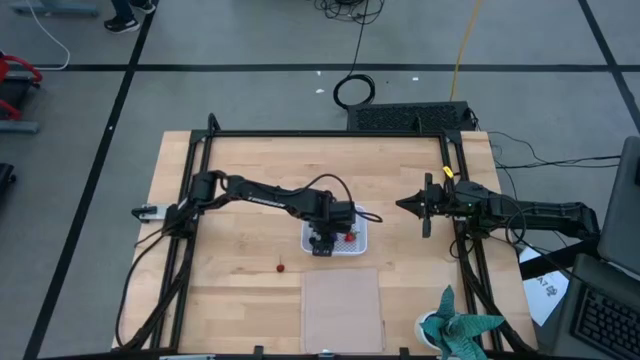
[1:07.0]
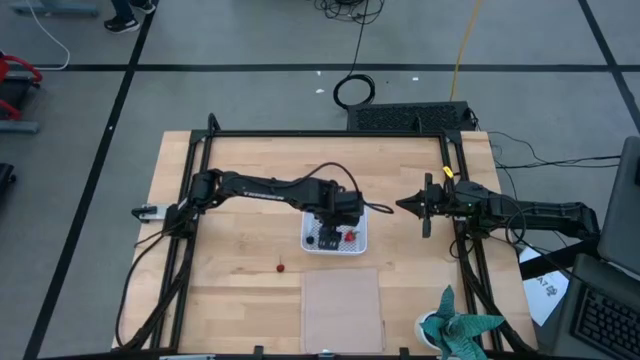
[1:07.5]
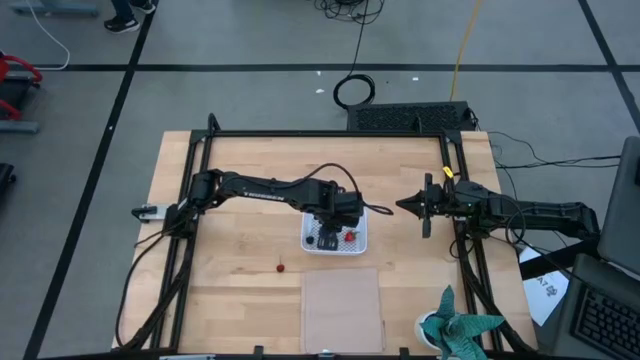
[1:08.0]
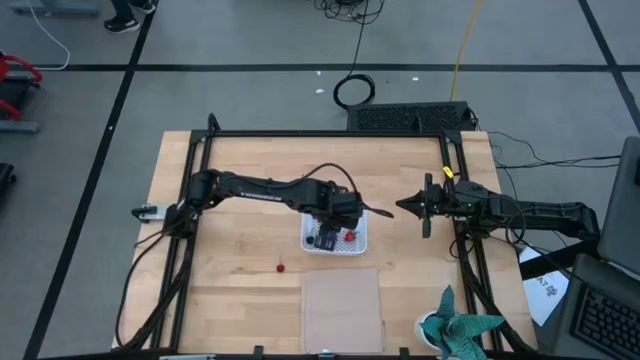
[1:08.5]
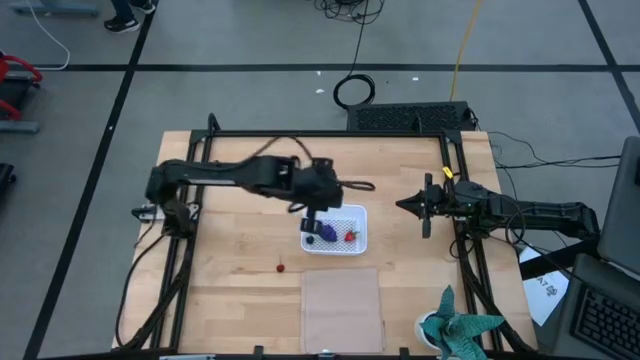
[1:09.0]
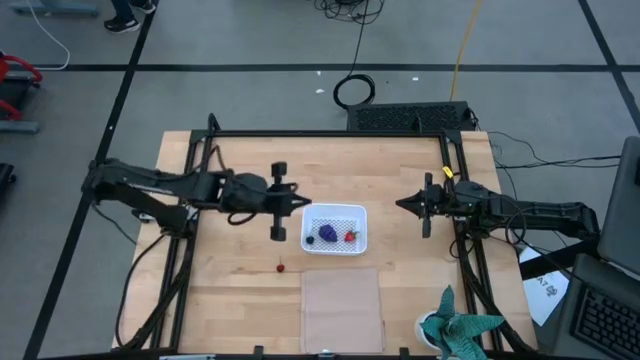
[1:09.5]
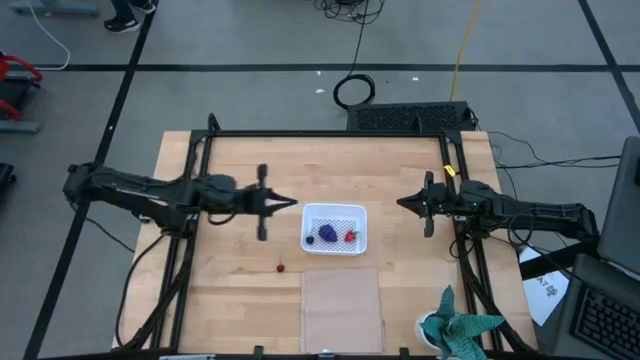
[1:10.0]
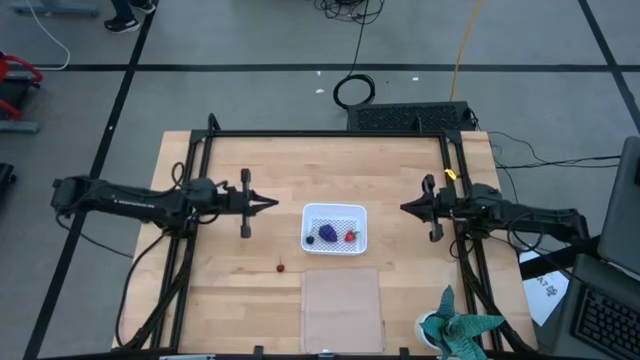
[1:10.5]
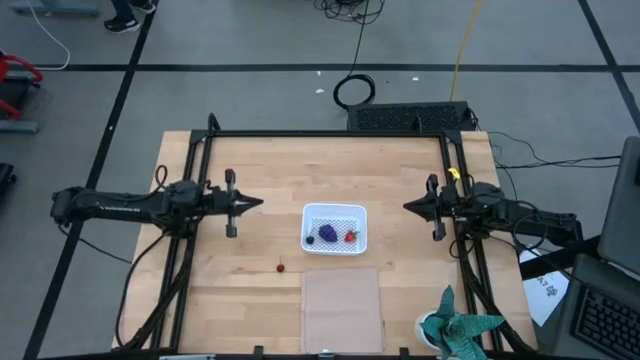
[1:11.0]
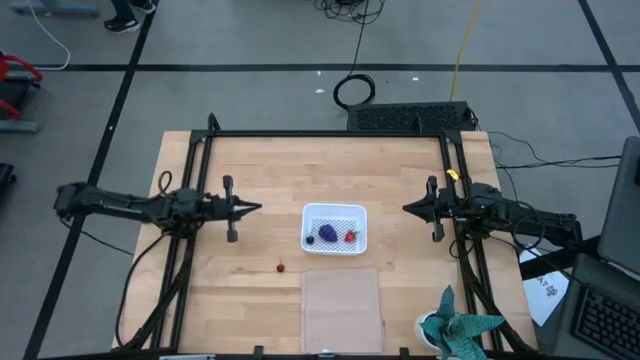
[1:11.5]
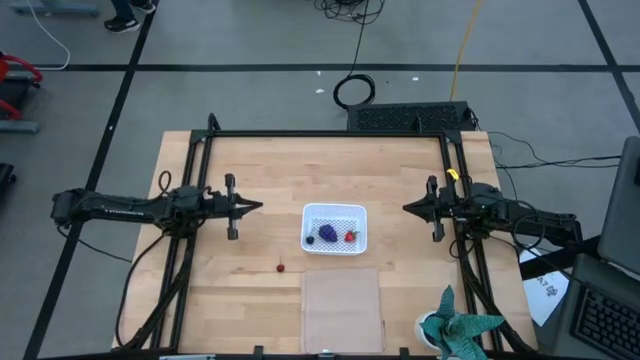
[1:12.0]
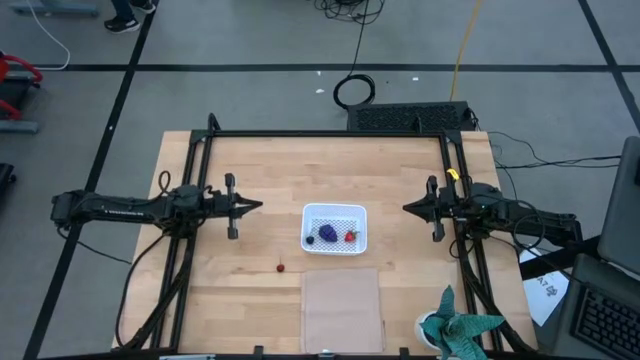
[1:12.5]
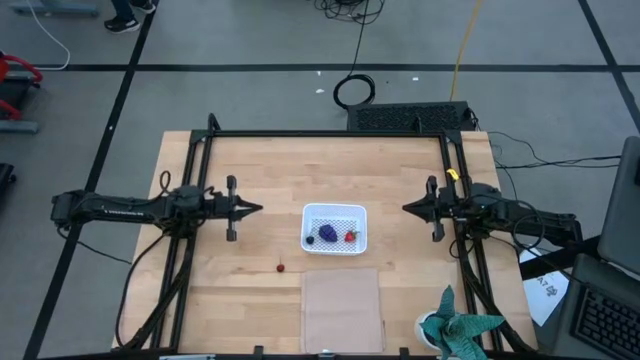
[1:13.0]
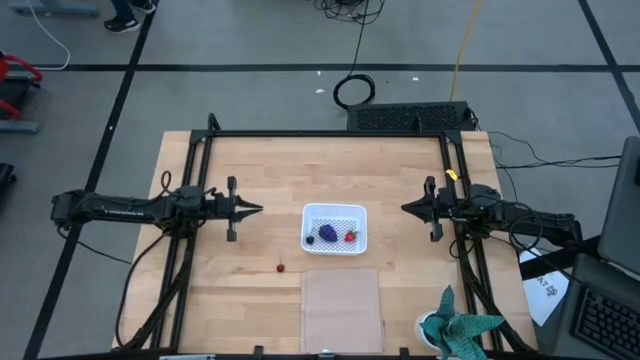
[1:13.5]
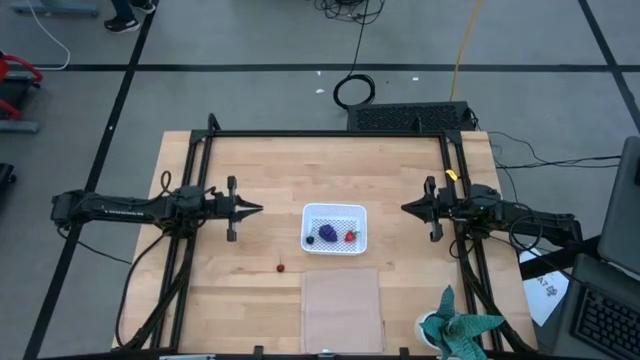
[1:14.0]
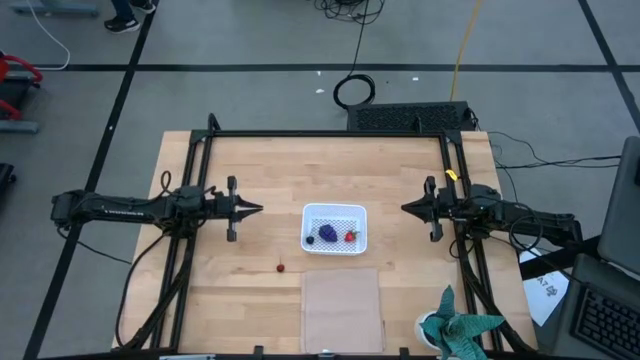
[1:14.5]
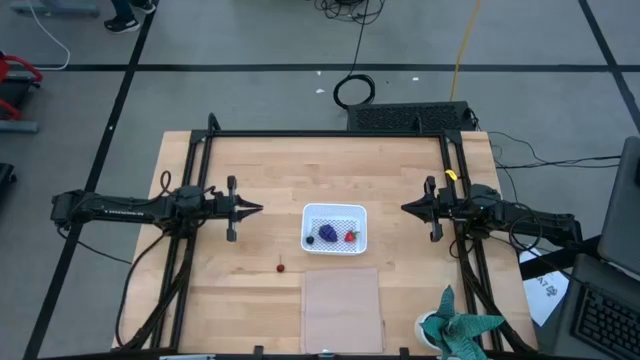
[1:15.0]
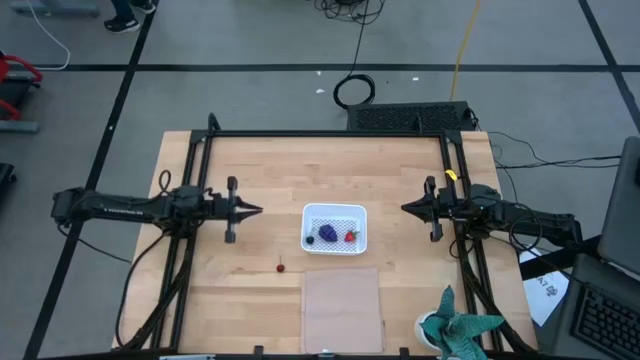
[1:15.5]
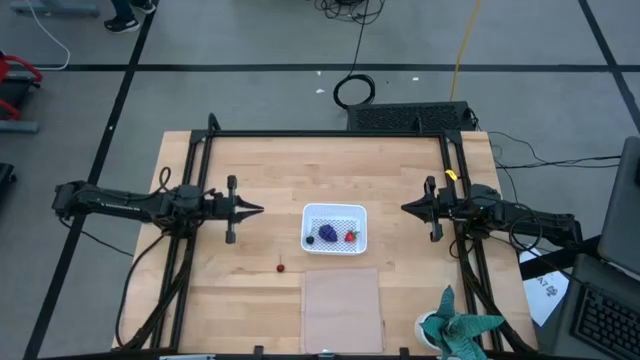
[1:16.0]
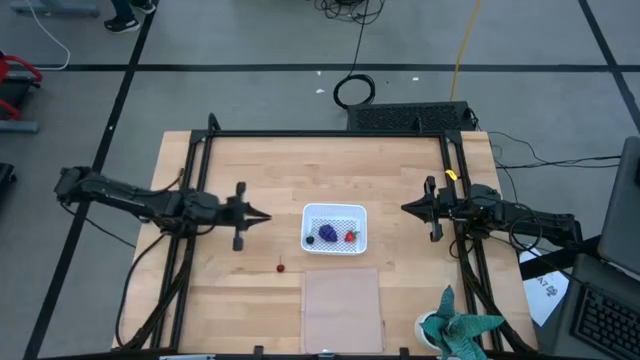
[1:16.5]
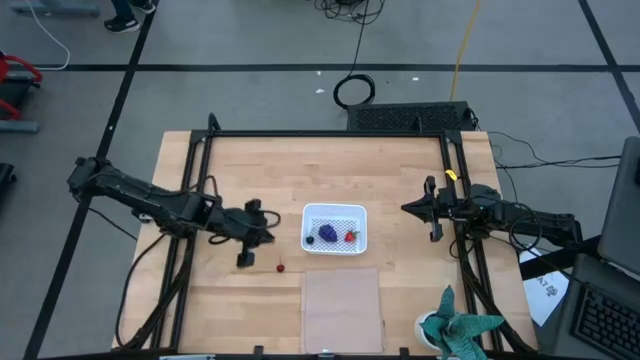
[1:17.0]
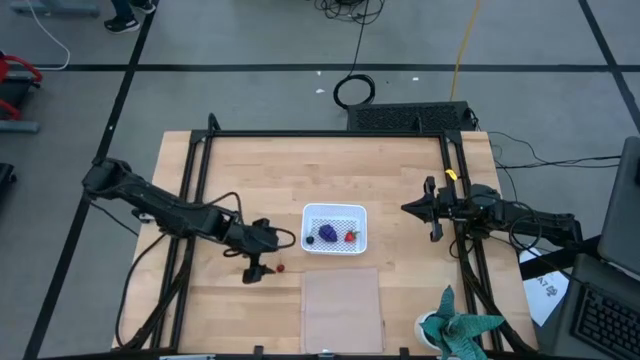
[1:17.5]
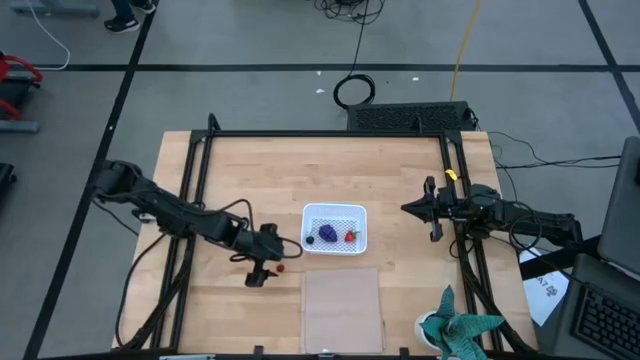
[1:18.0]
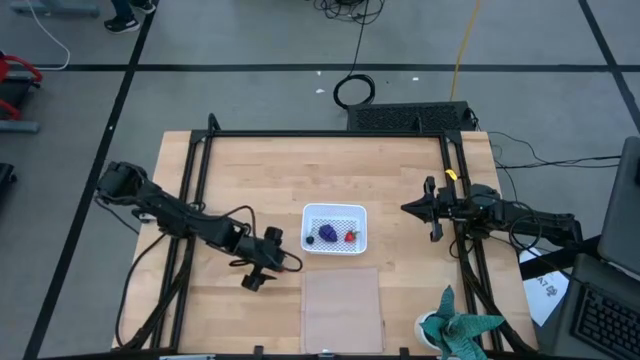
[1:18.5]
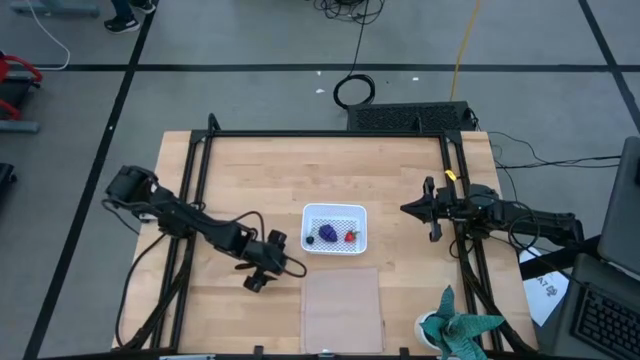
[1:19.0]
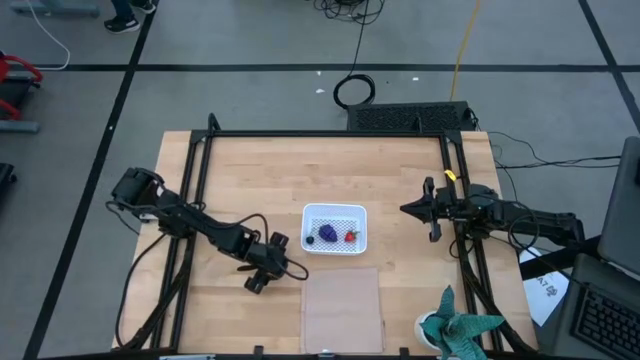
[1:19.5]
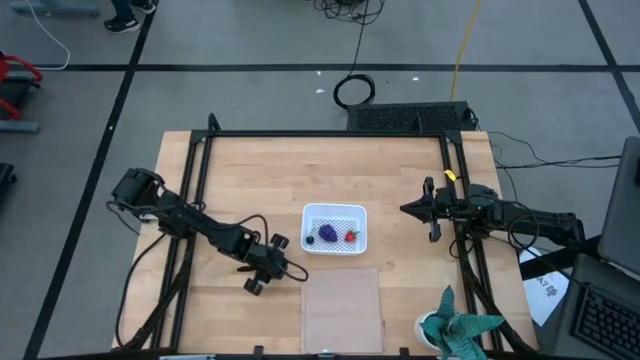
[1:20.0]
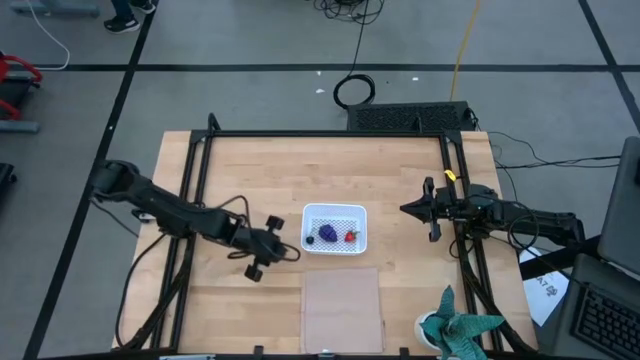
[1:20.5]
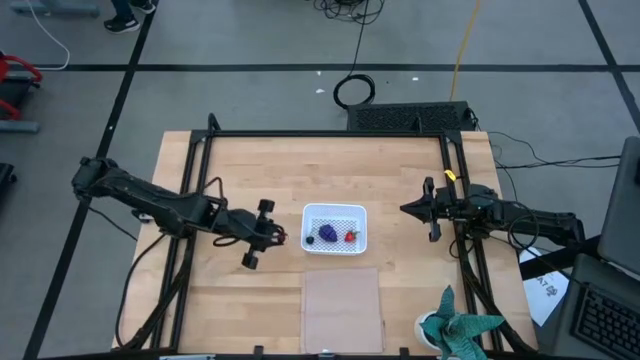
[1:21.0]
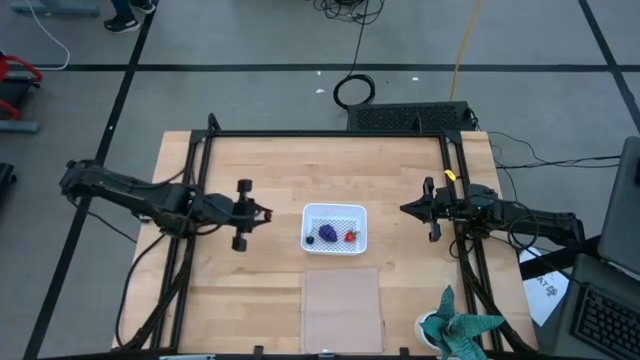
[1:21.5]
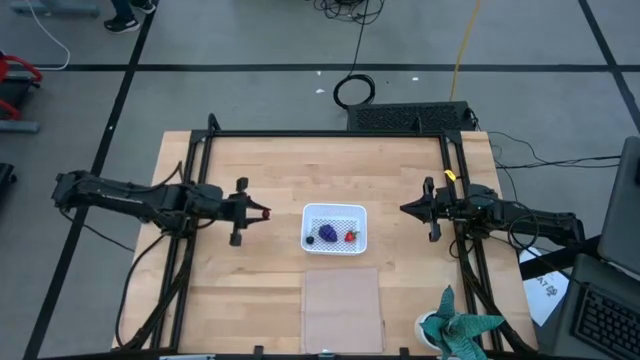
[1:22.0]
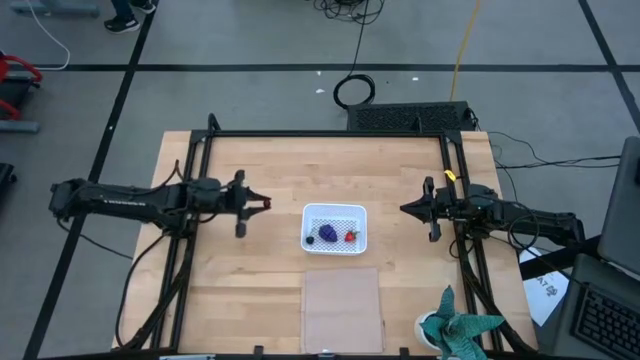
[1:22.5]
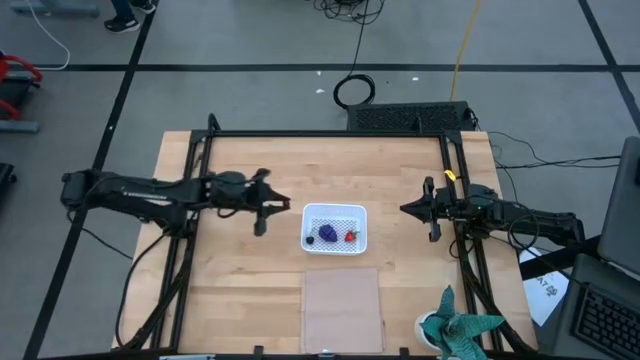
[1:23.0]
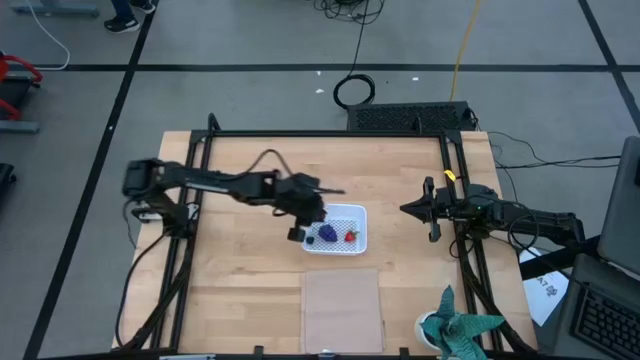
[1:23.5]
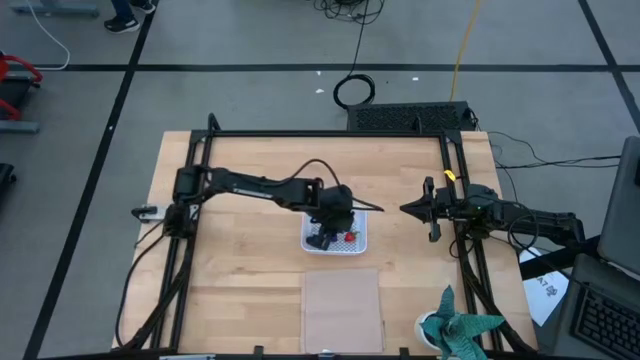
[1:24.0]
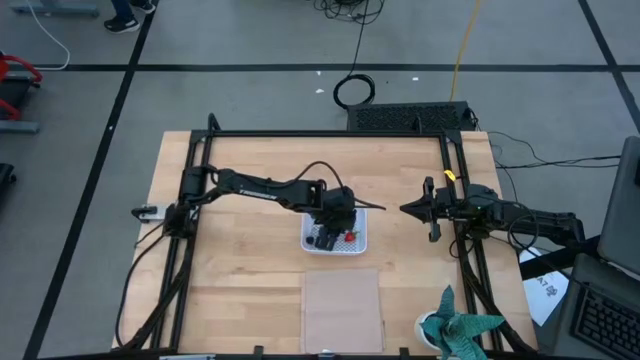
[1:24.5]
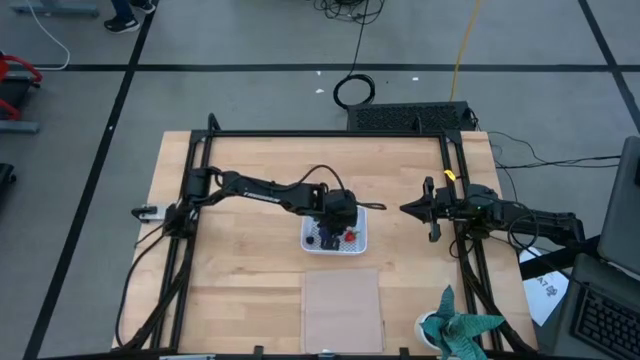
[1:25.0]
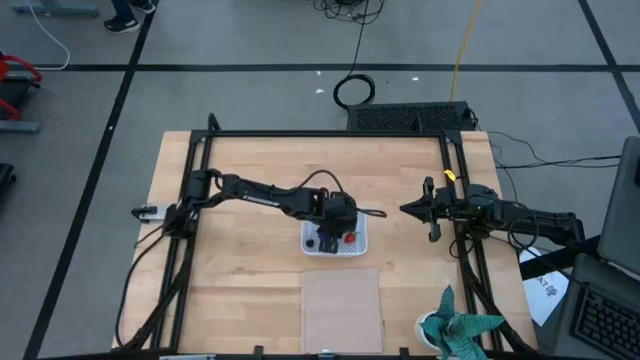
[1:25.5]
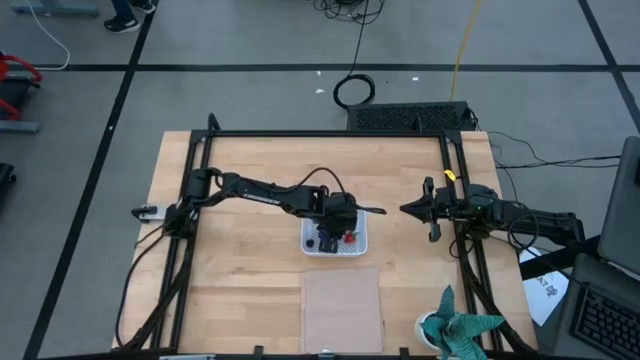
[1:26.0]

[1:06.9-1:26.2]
Task: Pick and placing Produce into tupperware
Put the red cherry into the white bin

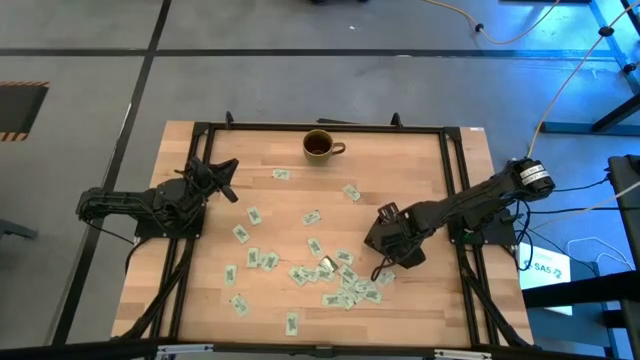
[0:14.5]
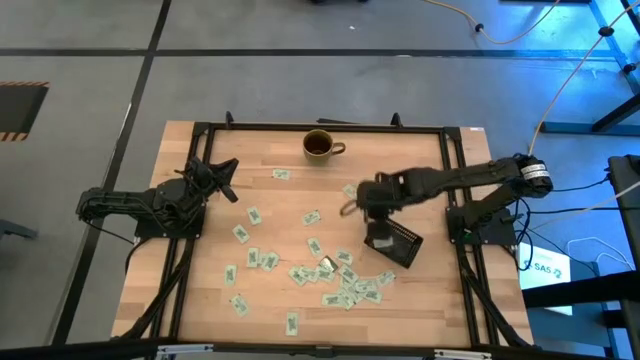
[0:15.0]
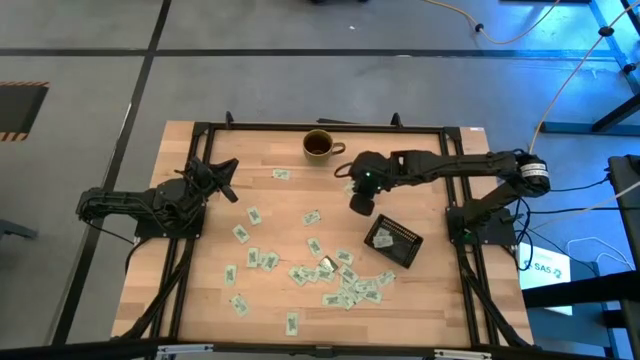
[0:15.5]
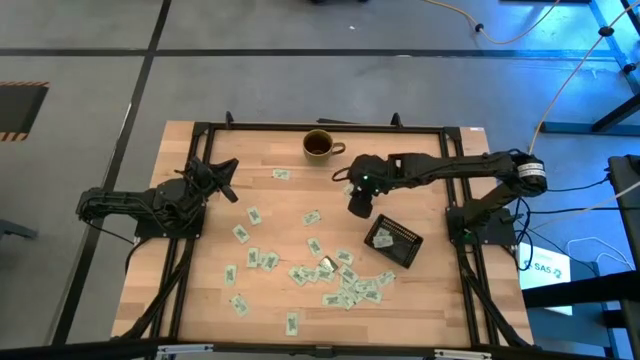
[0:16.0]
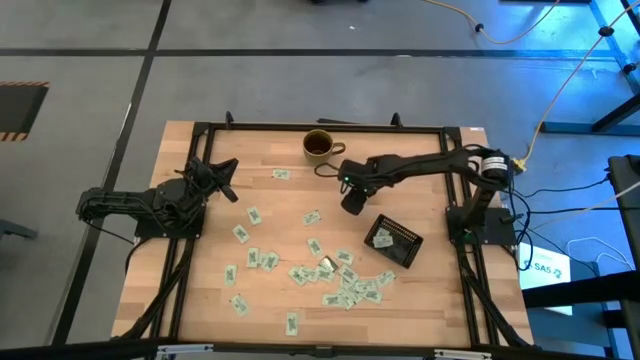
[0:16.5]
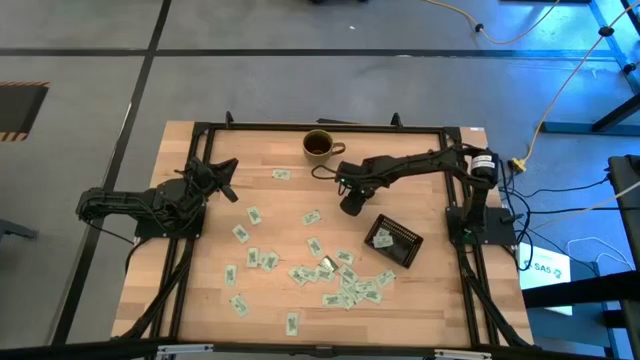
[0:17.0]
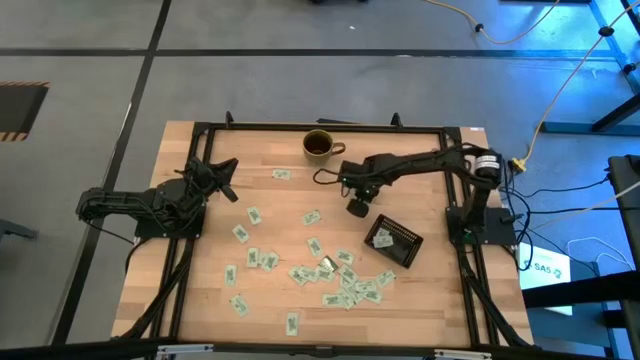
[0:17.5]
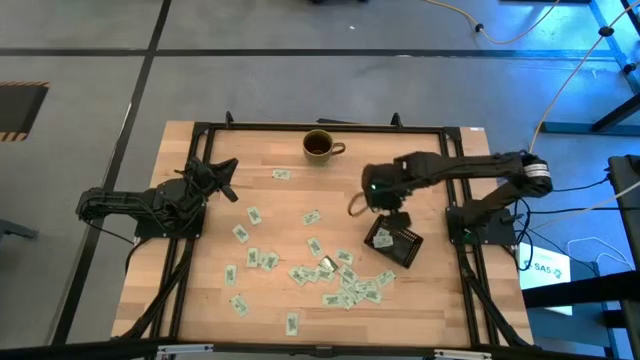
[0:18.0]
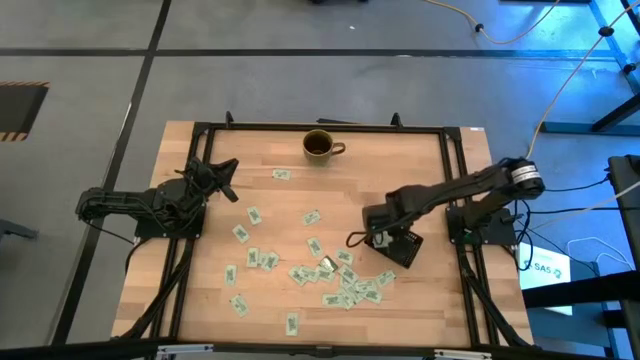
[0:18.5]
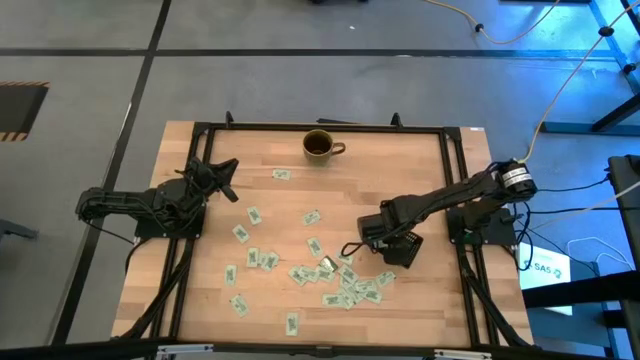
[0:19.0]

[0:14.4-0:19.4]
Task: Pick and place Stevia / Truvia into bins
Put the stevia packet into the black bin
